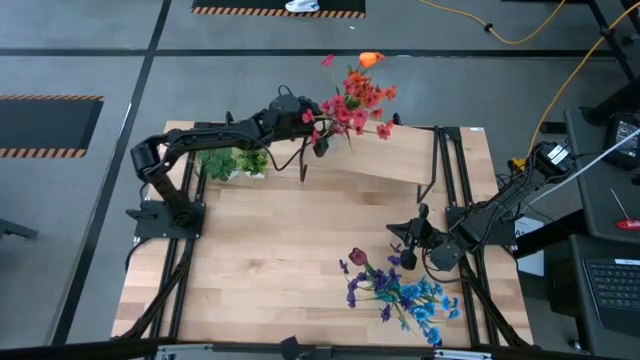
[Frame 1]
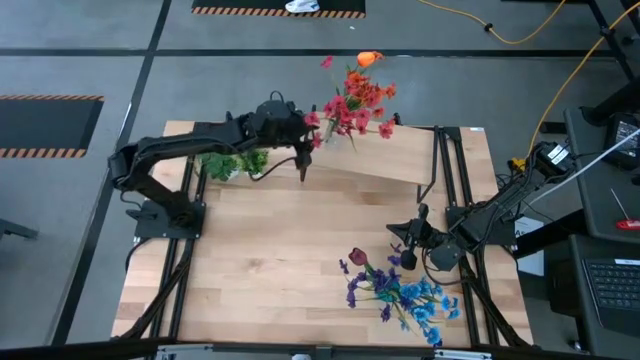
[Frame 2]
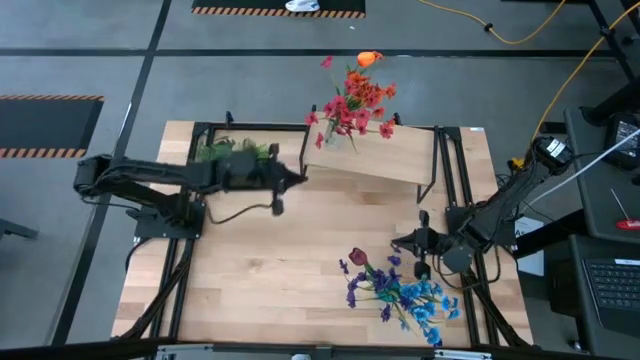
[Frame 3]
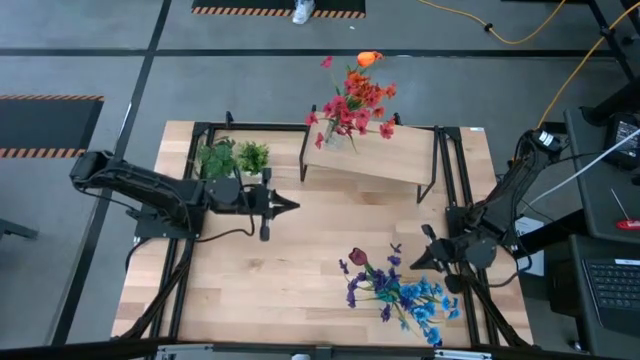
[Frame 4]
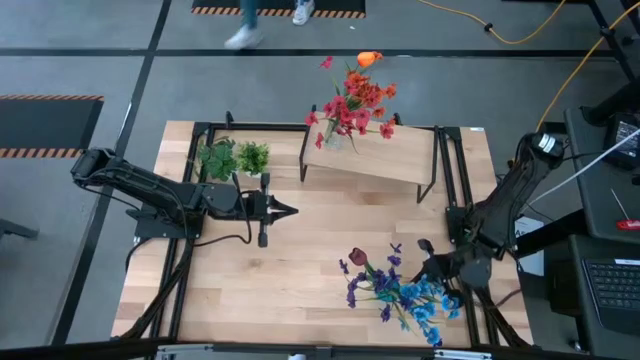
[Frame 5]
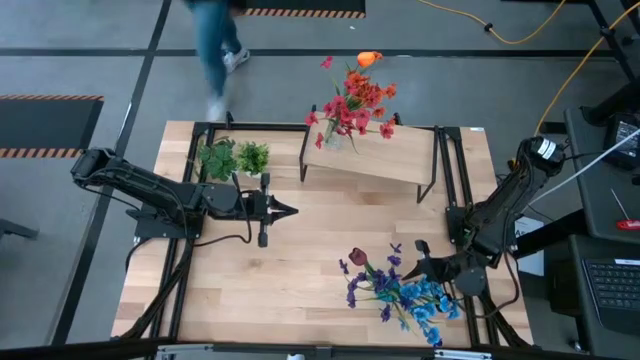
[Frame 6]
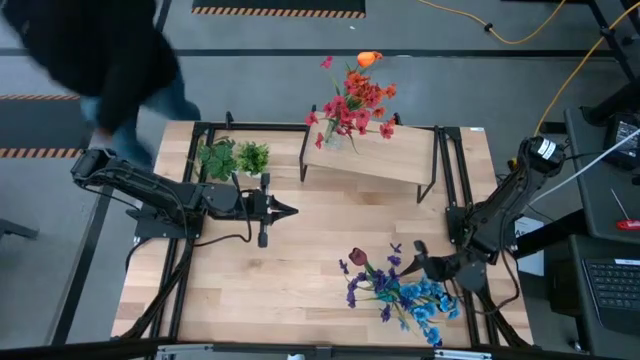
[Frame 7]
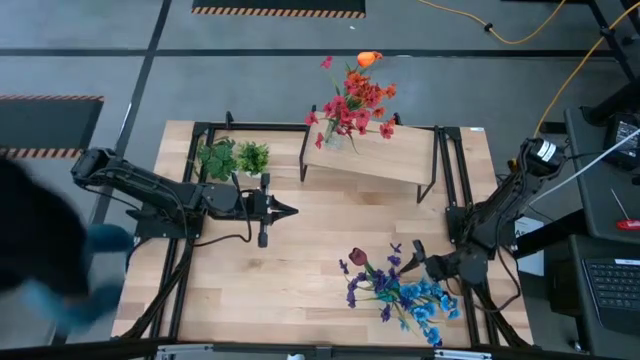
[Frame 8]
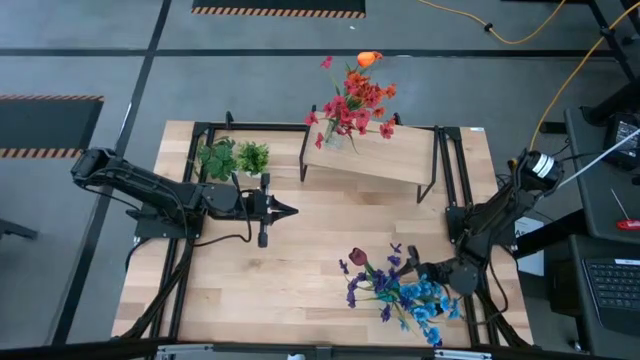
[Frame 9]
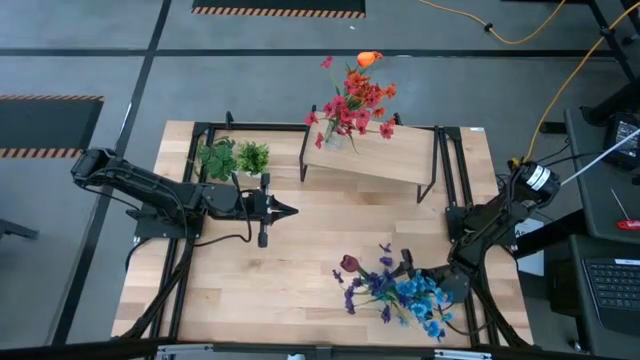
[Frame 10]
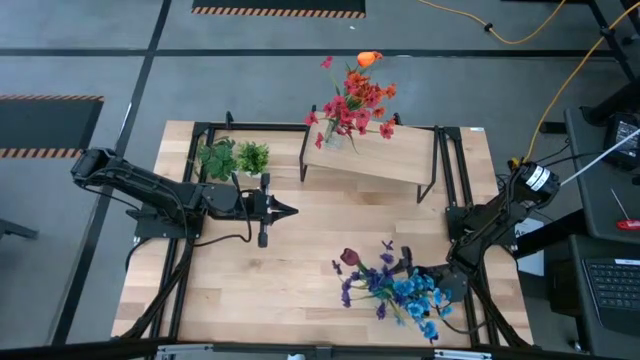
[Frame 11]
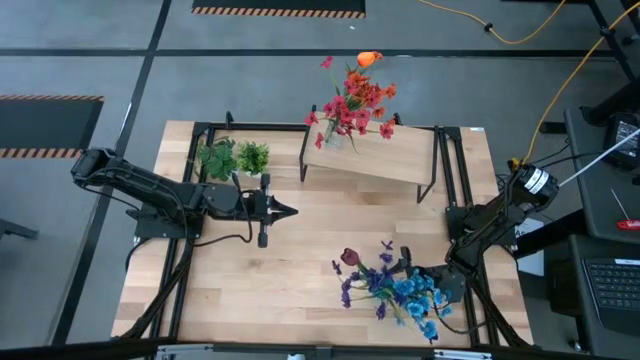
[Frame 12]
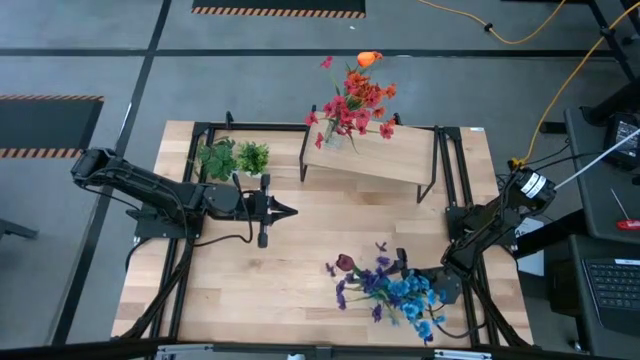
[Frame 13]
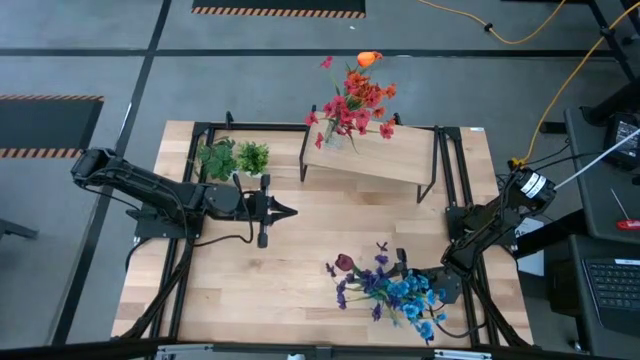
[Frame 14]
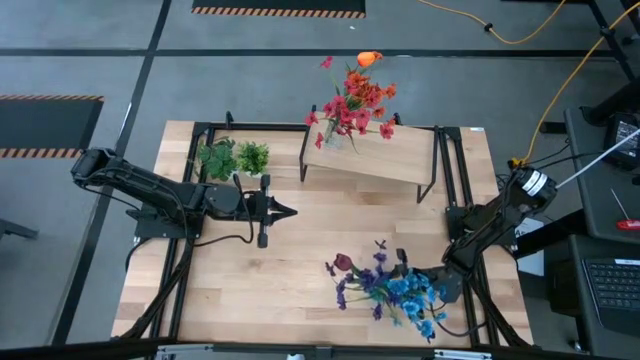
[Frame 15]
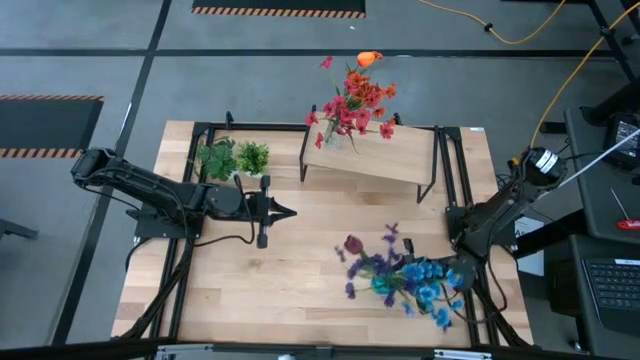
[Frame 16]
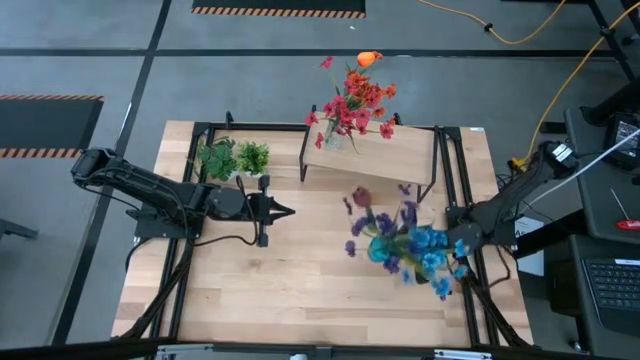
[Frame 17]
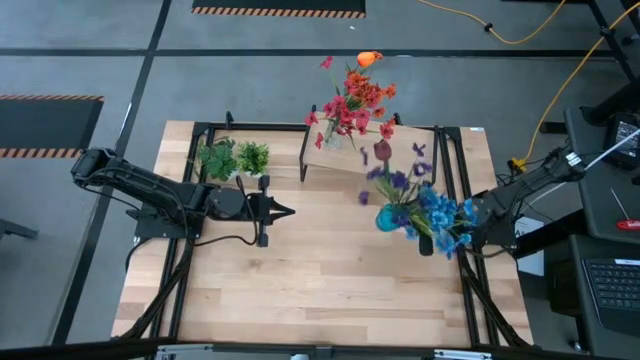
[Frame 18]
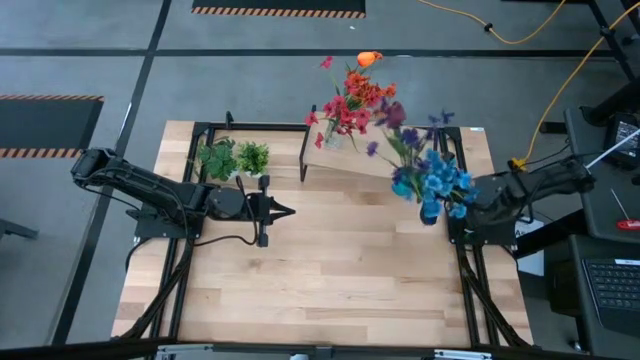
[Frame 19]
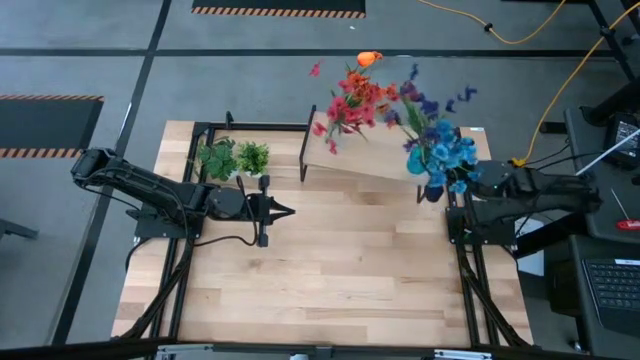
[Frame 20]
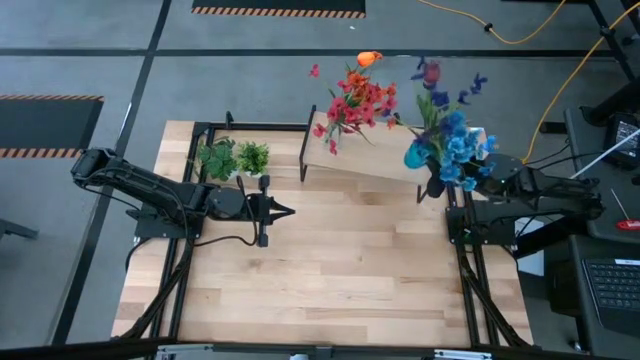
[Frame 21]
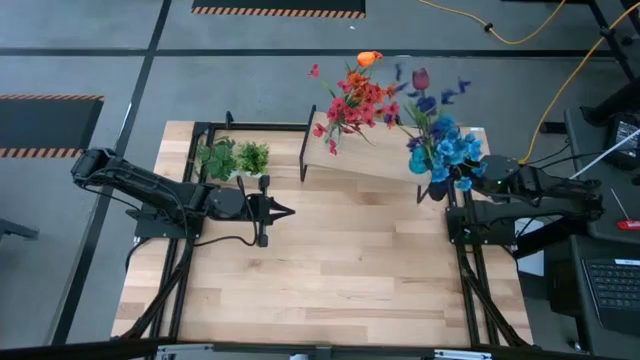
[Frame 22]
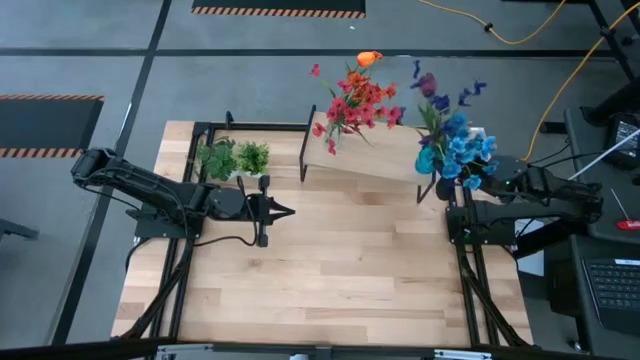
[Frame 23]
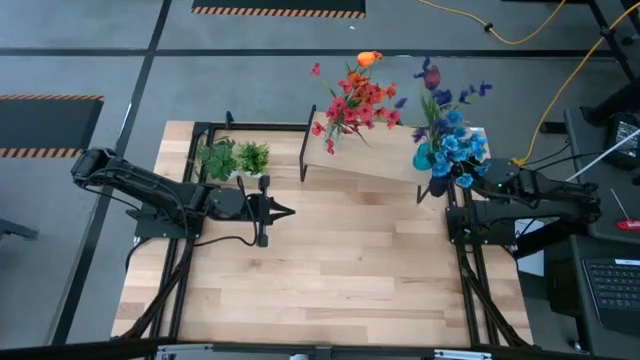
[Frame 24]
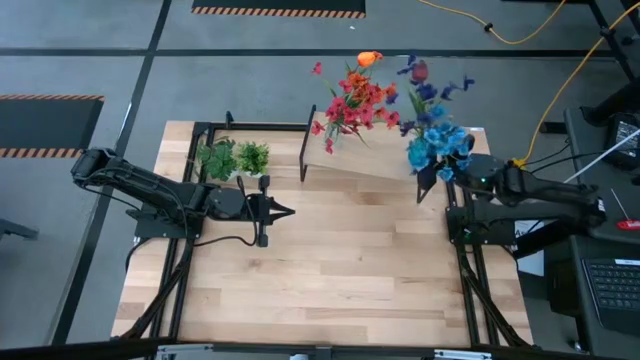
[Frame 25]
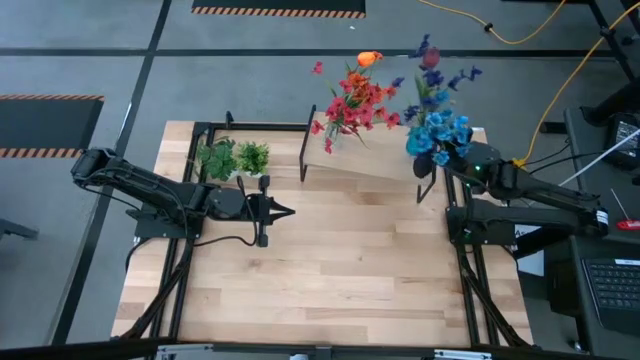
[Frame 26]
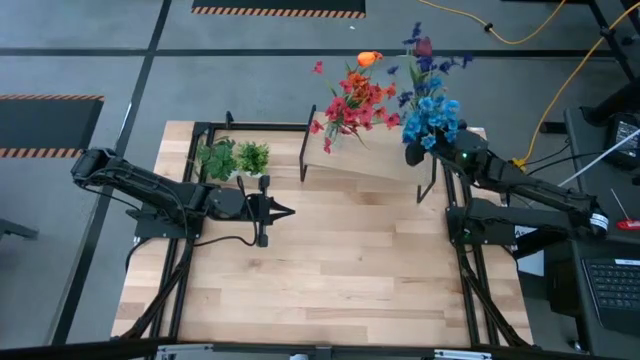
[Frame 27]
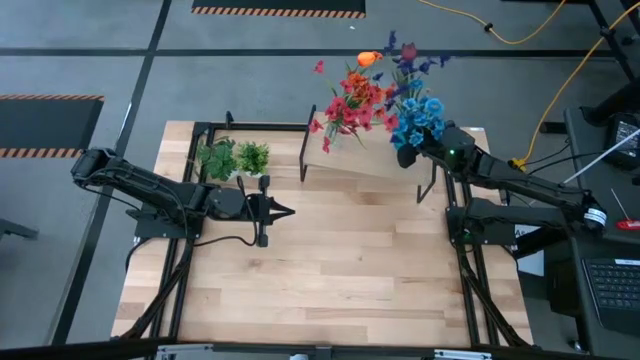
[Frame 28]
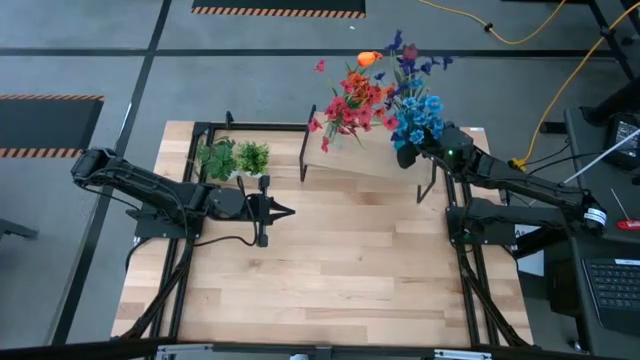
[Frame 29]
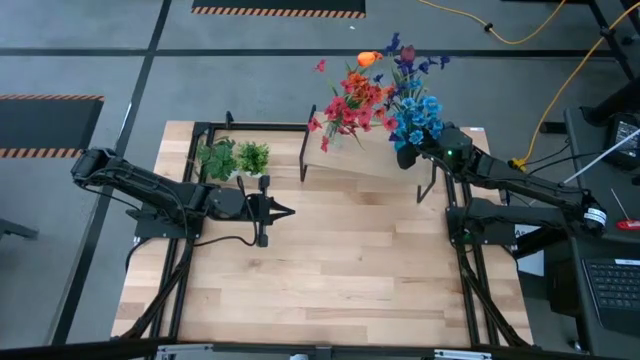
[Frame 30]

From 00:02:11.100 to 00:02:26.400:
Task: Pick and place flowers into a vace then onto a shelf
Put the blue vase on the shelf

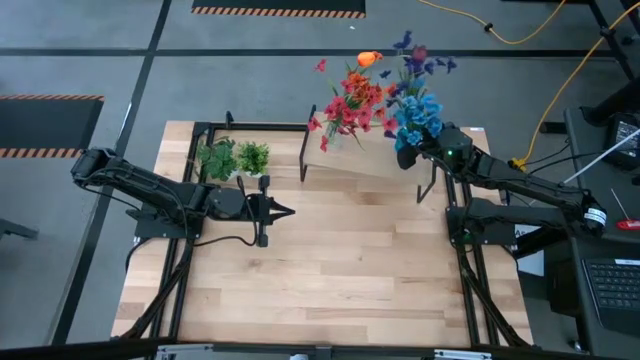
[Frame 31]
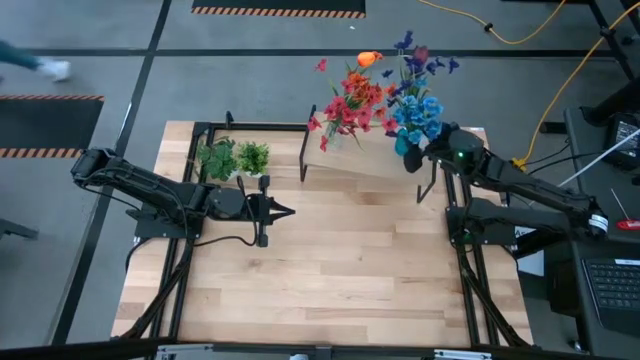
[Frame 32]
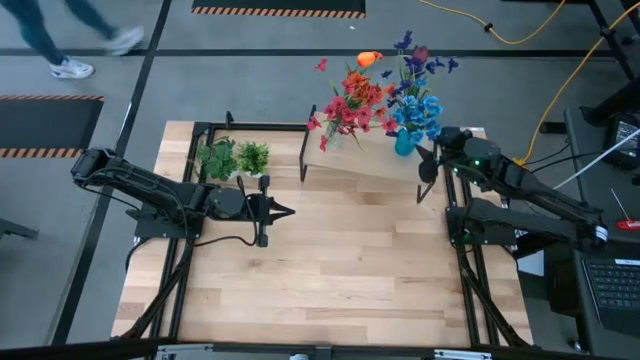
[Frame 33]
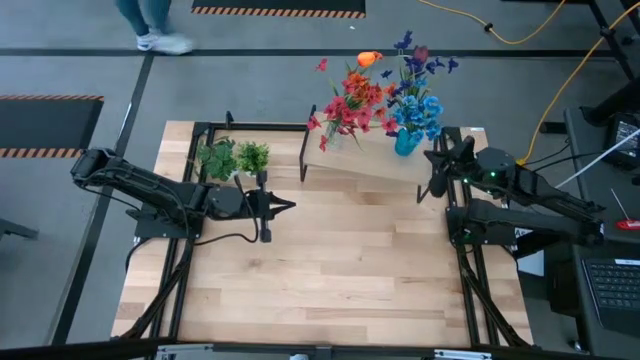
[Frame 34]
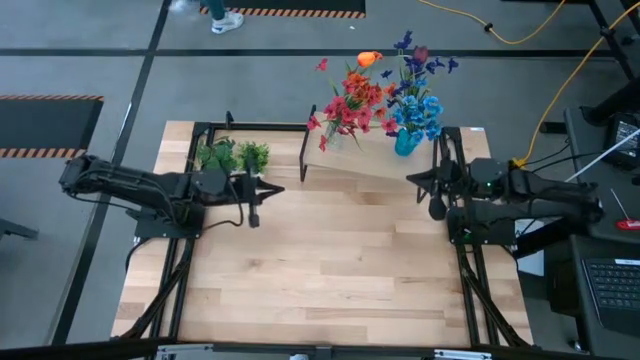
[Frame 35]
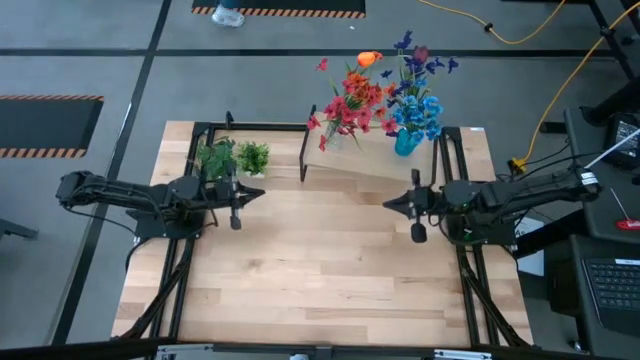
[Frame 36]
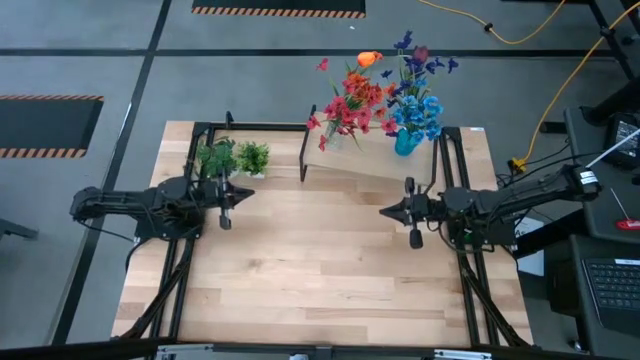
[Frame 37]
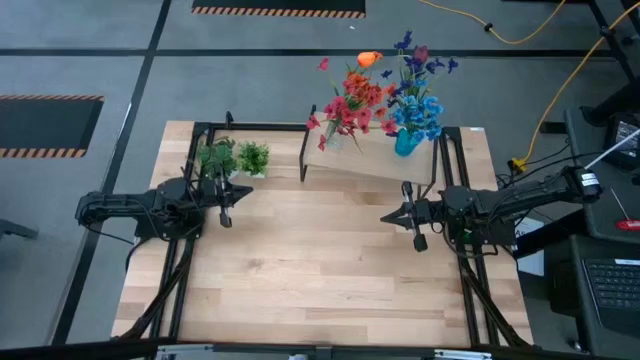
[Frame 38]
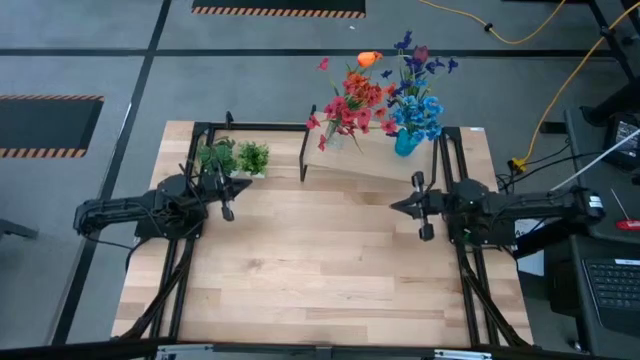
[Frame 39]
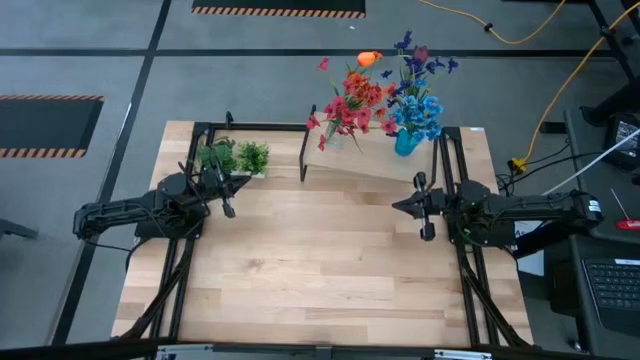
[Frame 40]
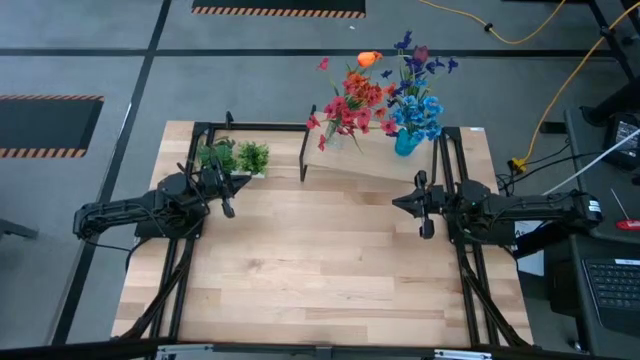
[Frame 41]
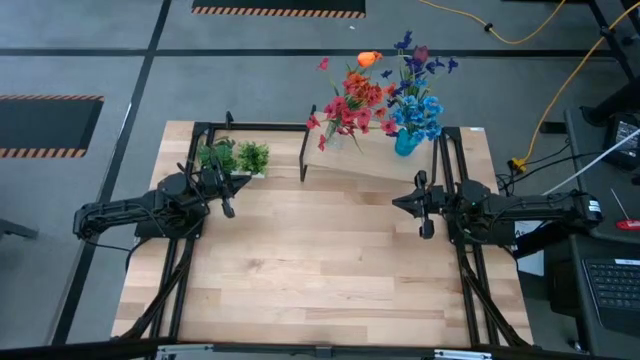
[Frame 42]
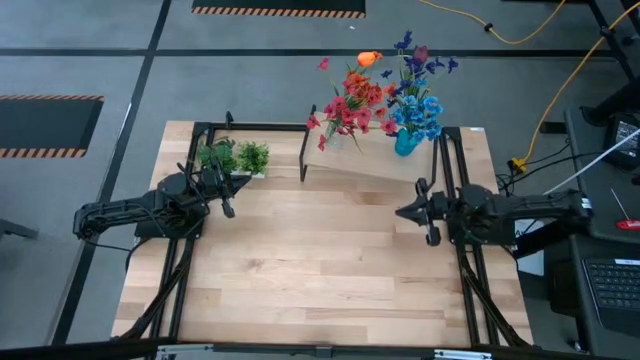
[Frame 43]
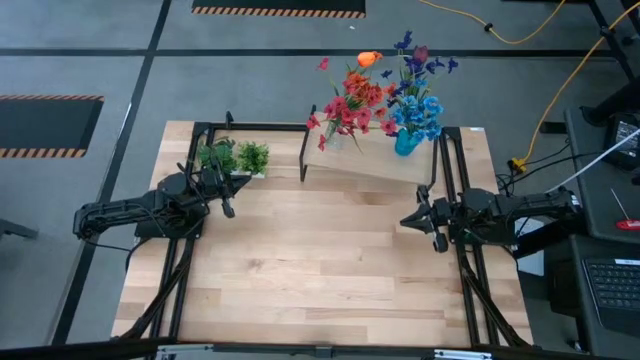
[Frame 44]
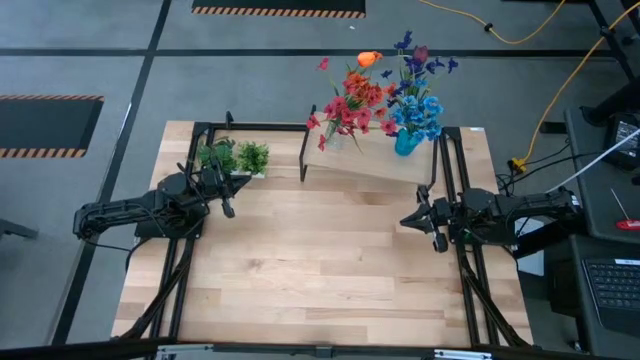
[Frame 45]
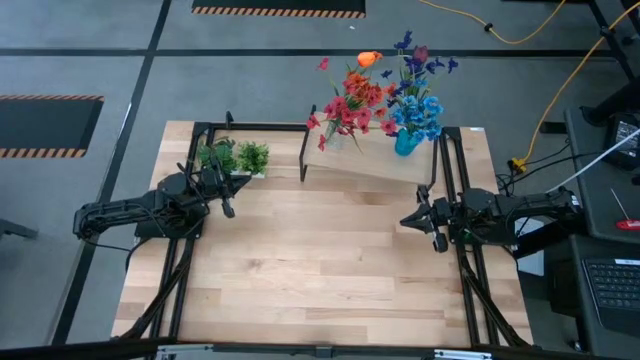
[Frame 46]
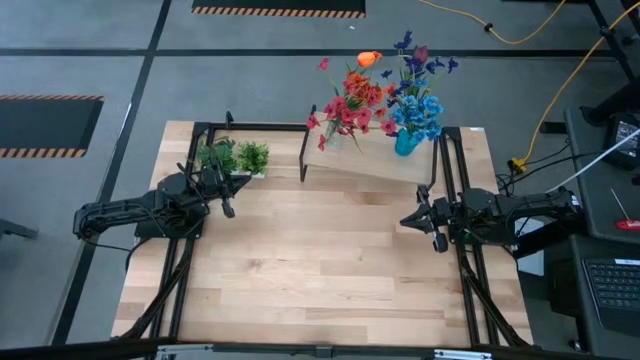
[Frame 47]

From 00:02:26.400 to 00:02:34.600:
Return to Home Position
